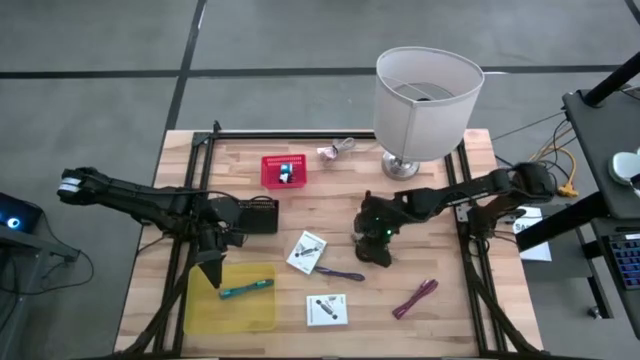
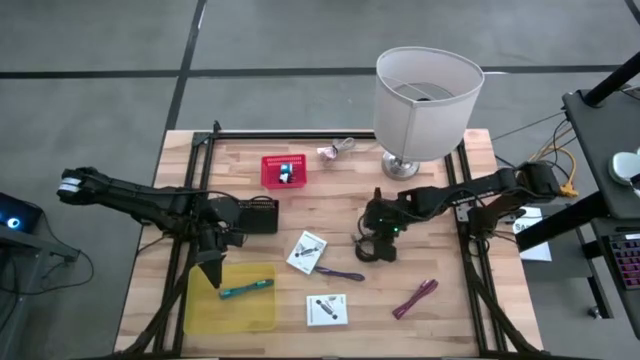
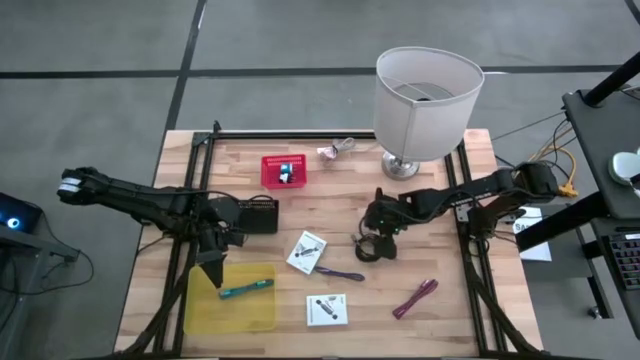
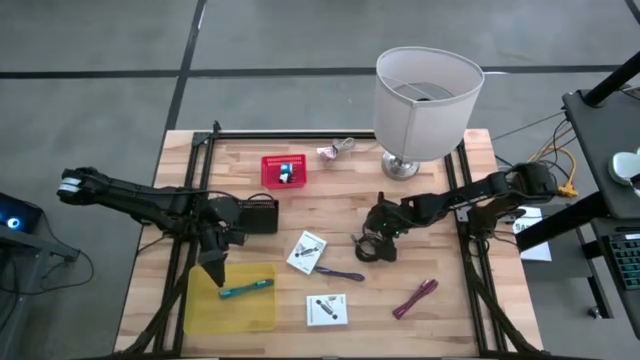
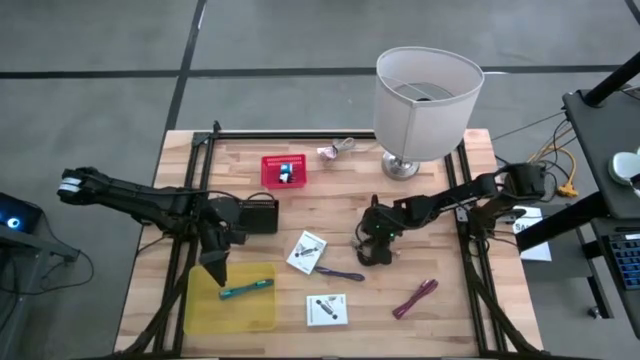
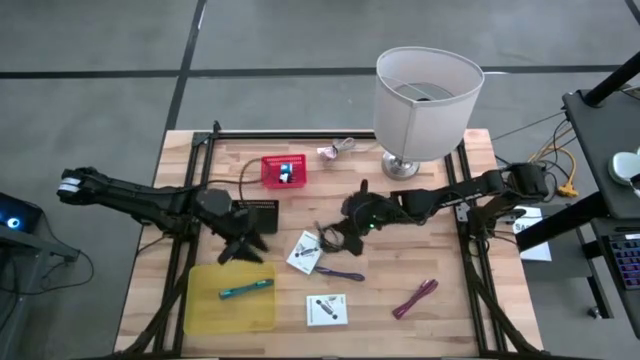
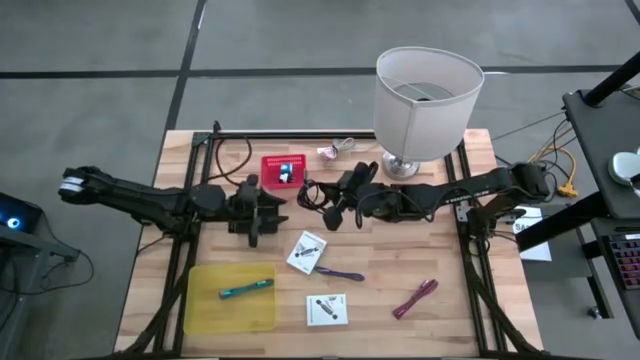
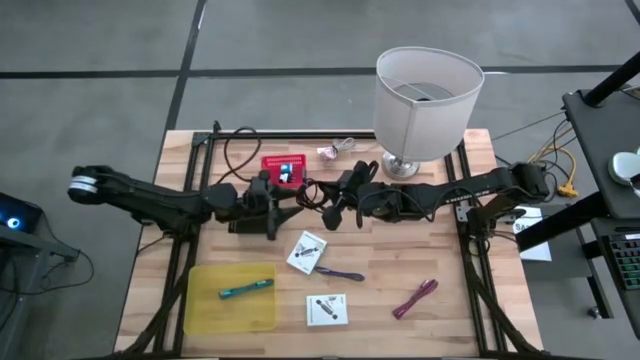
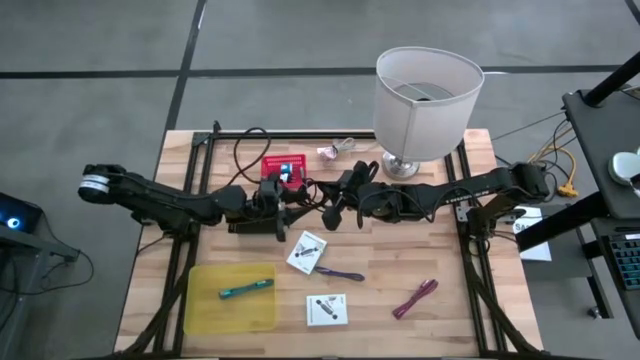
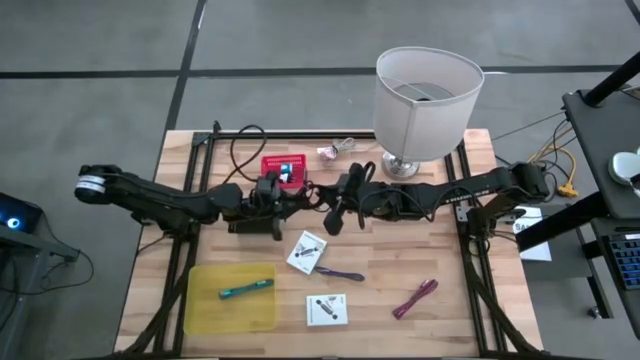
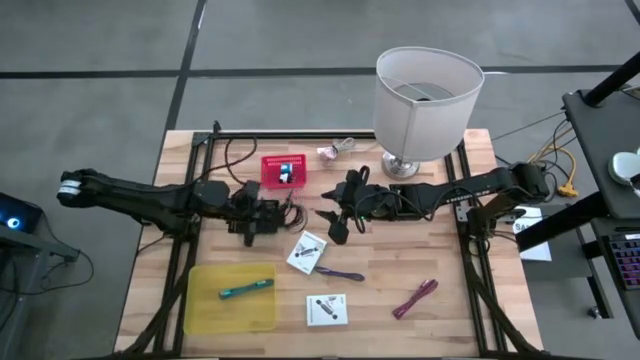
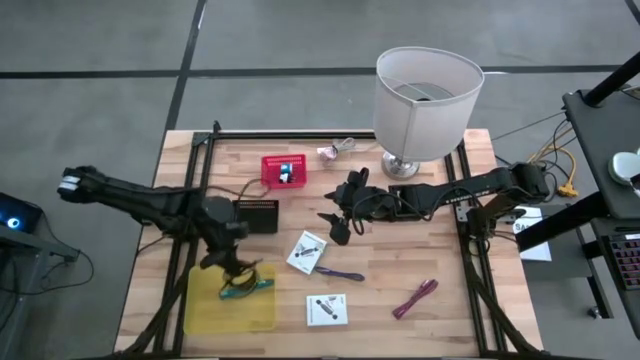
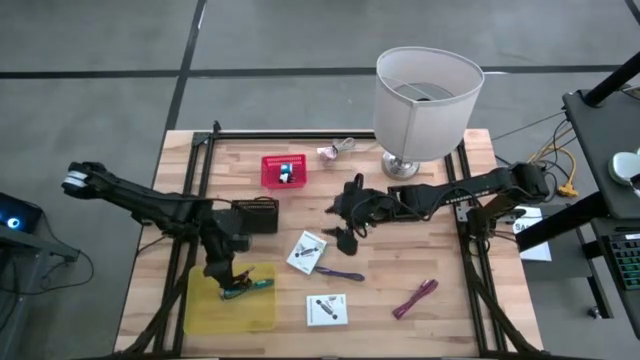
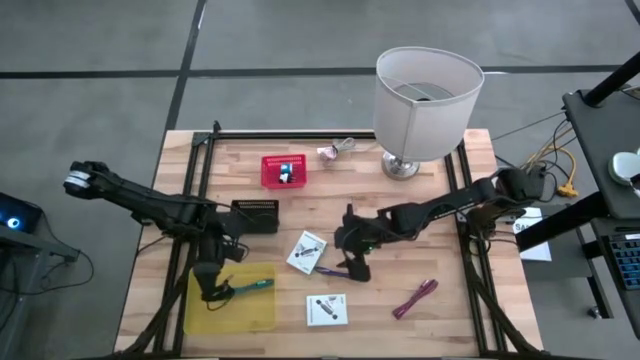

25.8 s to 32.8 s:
Task: Pick and place items into bin
Put the black charger cable into the yellow bin

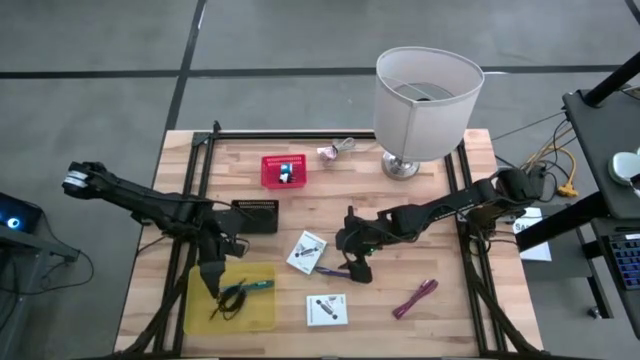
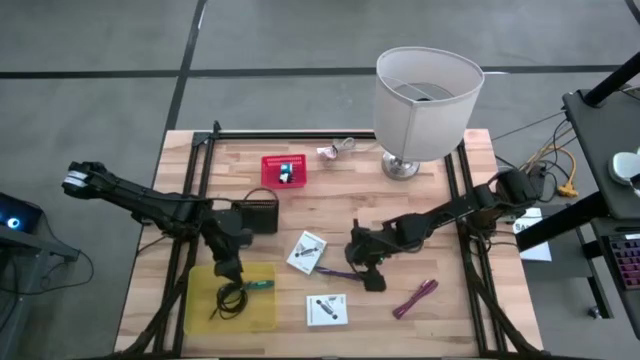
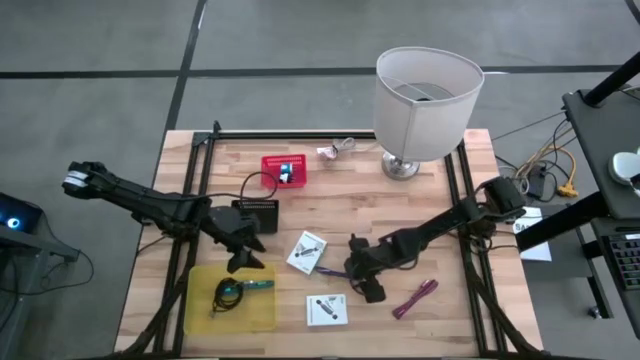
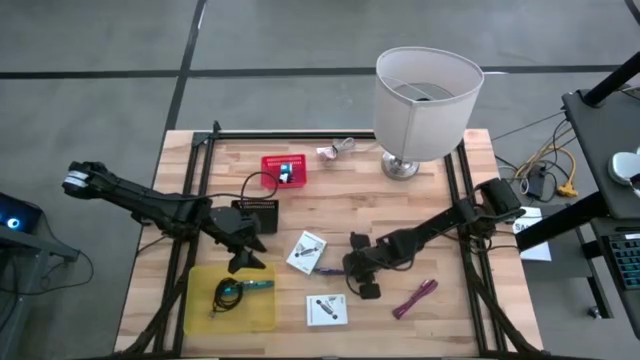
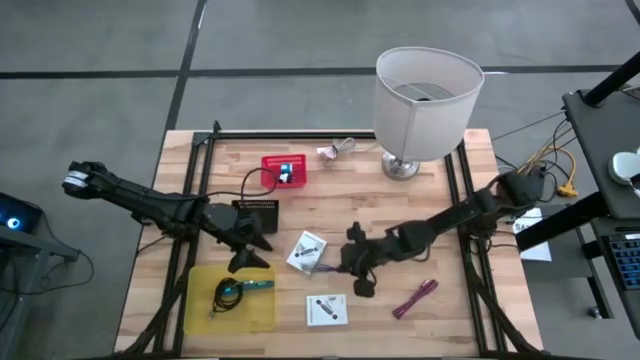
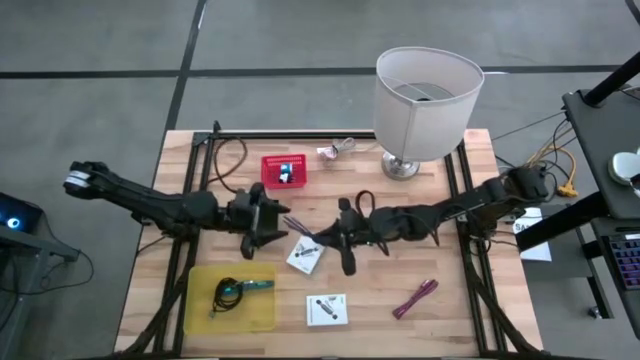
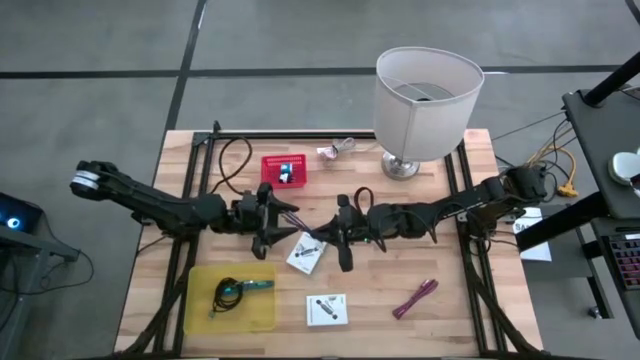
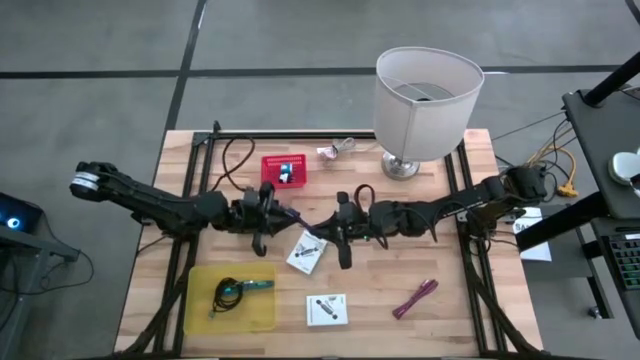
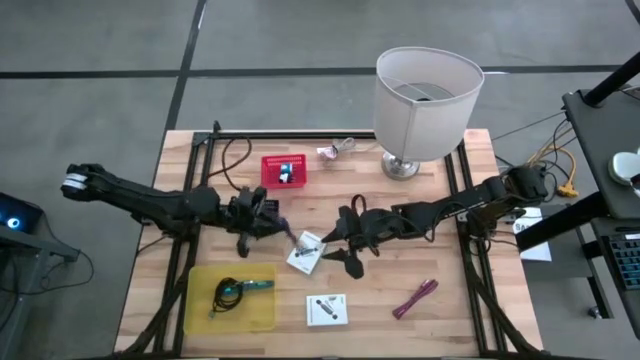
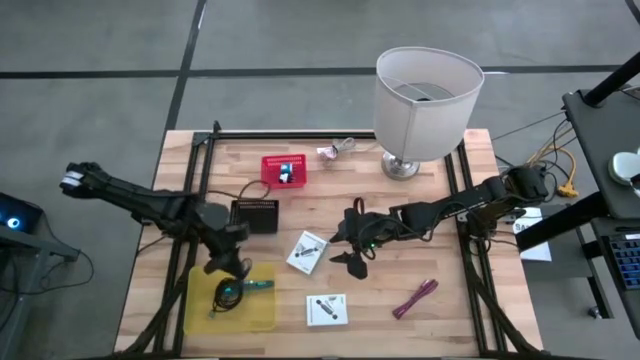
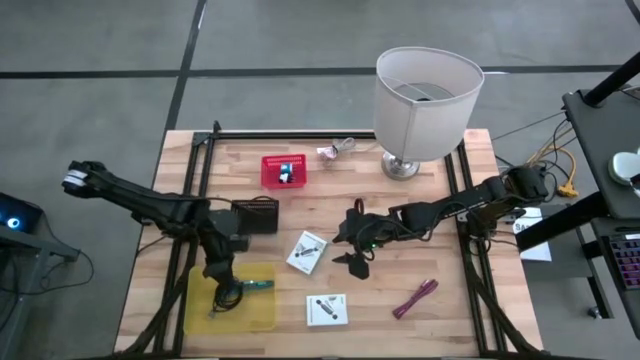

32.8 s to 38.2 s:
Put the purple charger cable into the yellow bin

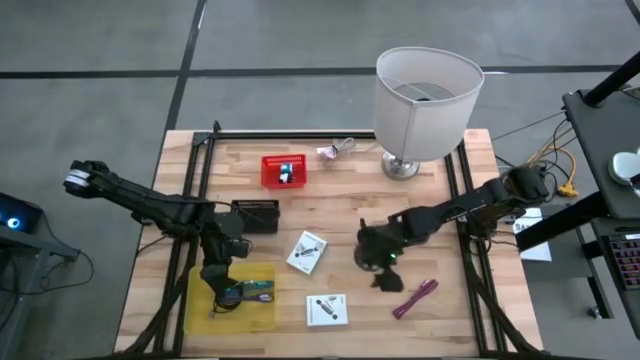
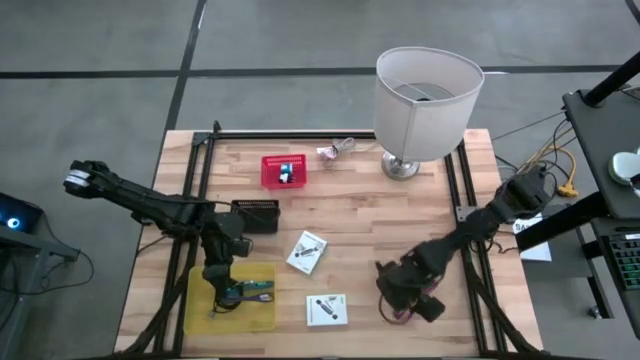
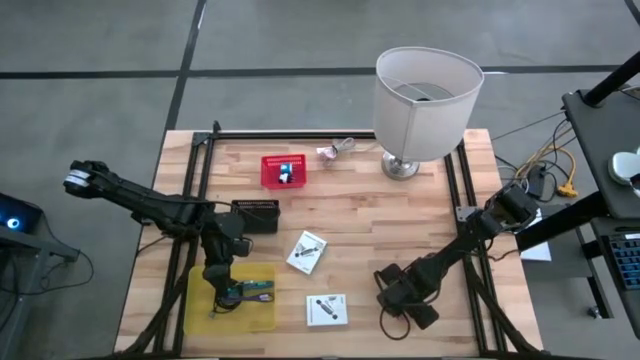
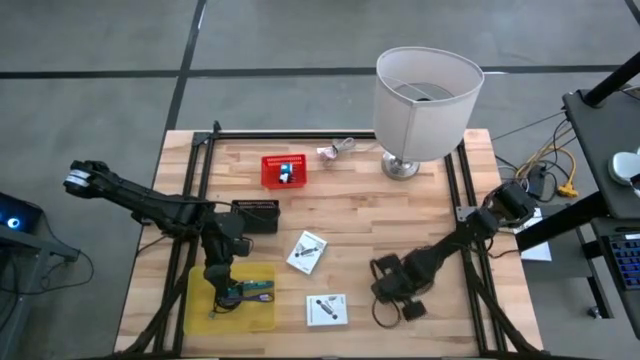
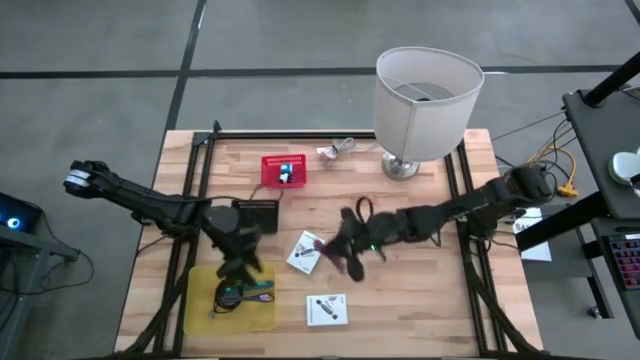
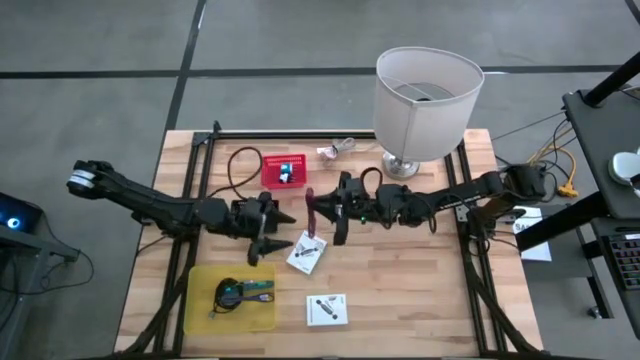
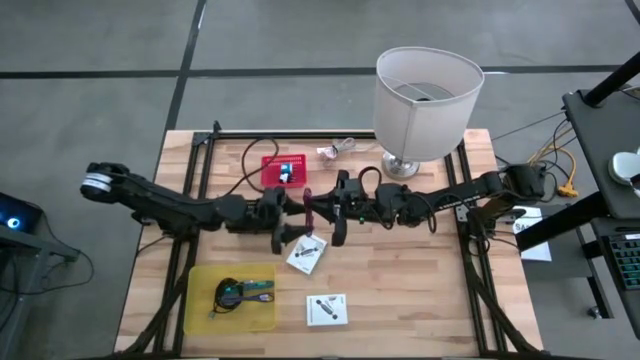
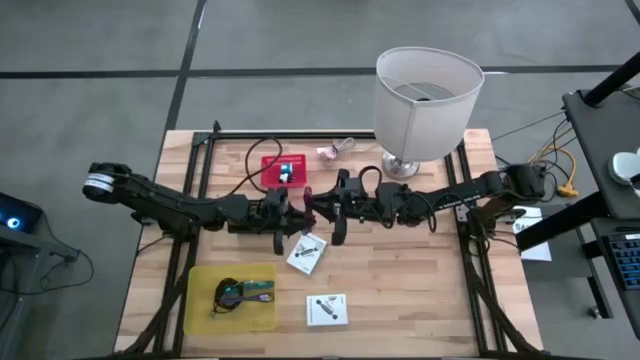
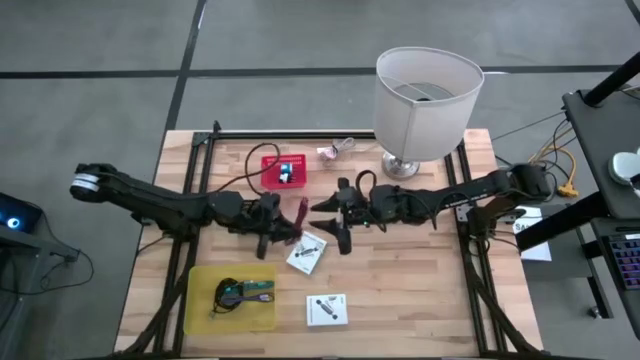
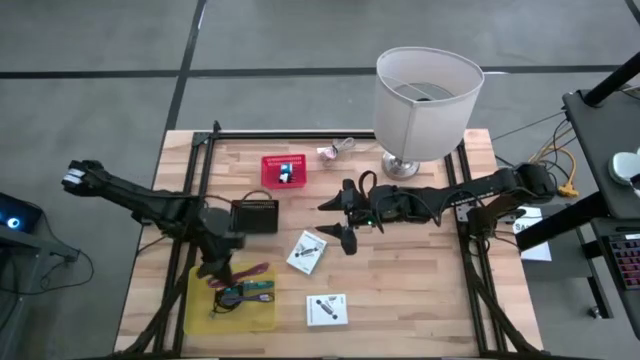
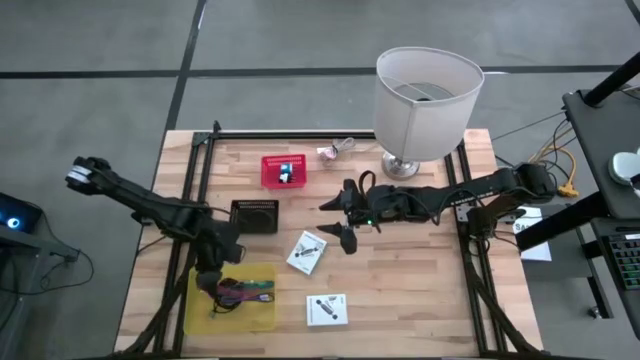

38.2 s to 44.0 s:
Put the red charger cable into the yellow bin

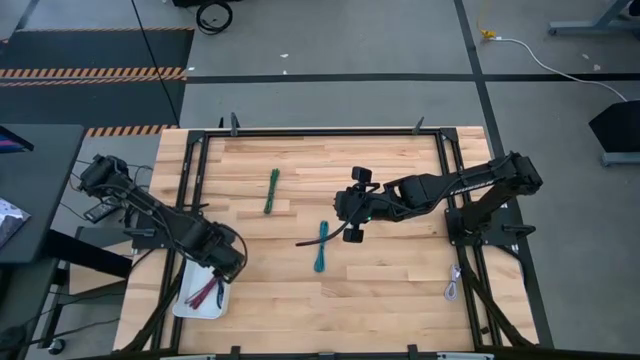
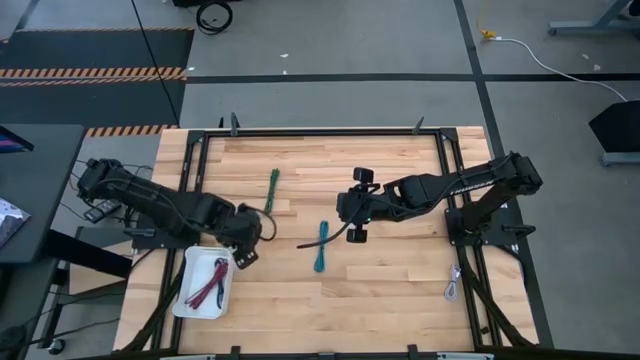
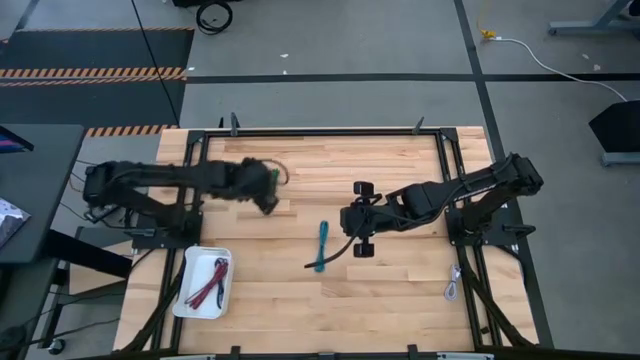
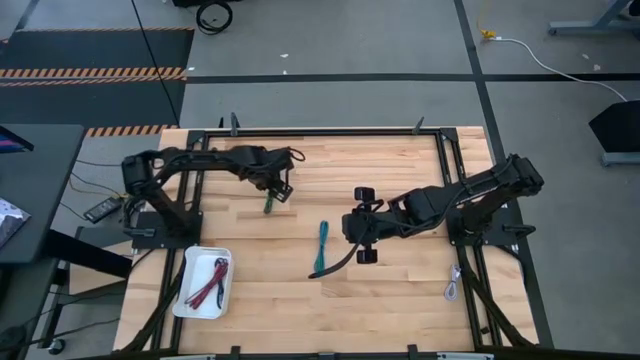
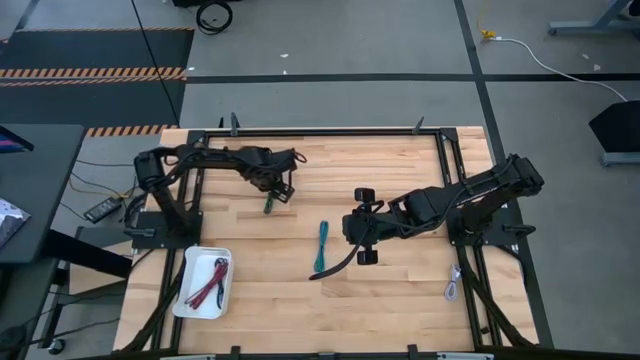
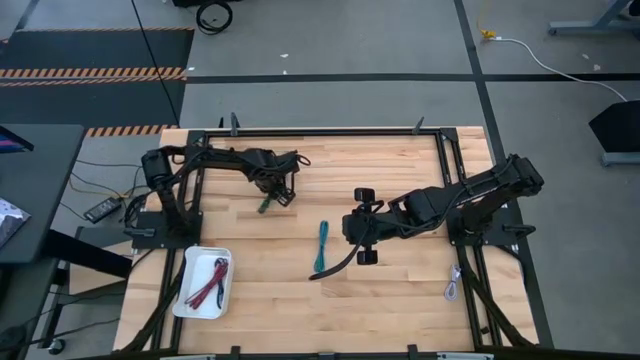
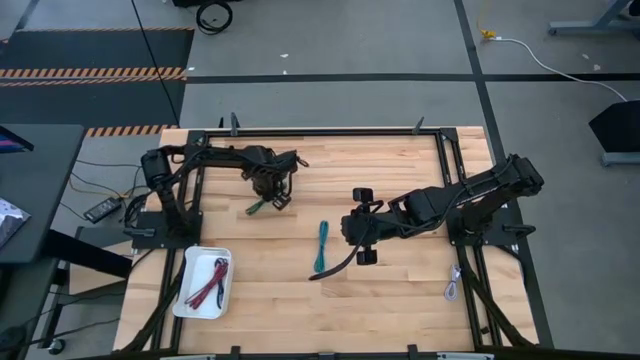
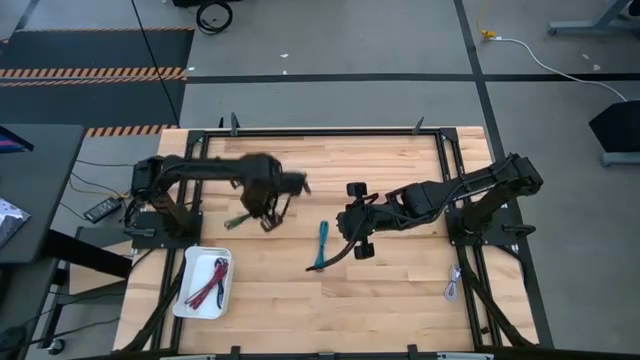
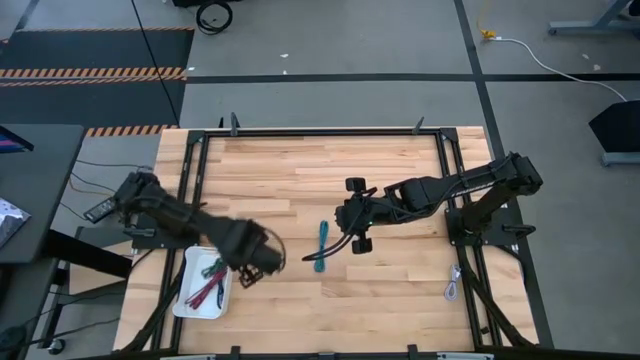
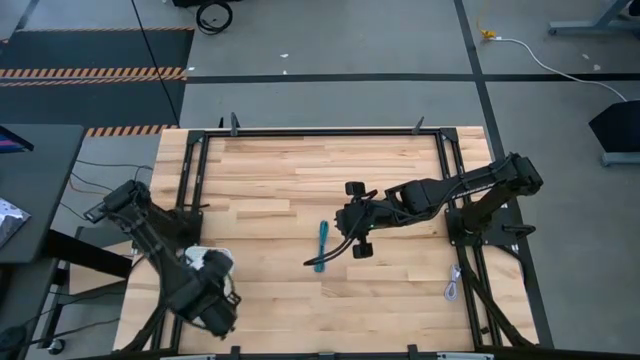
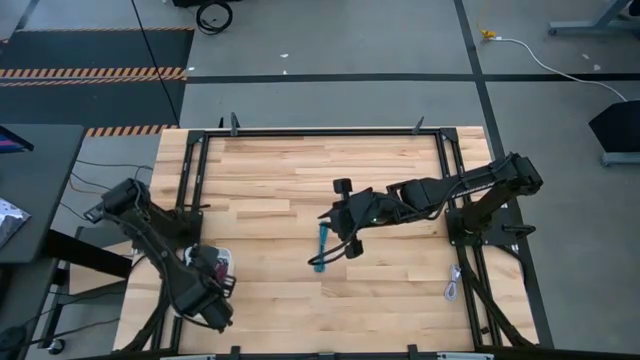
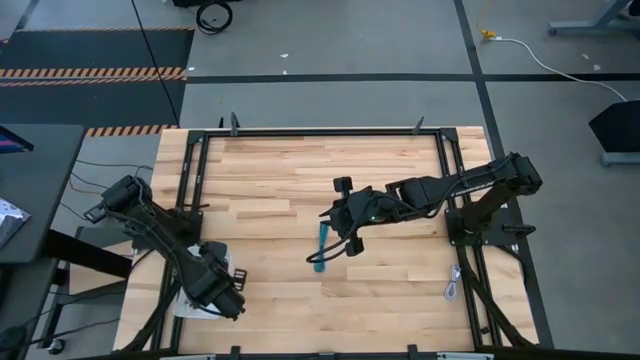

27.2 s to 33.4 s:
Task: Pick and place USB-C Cables
Put the green charger cable into the white bin
